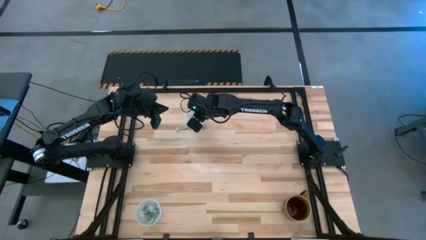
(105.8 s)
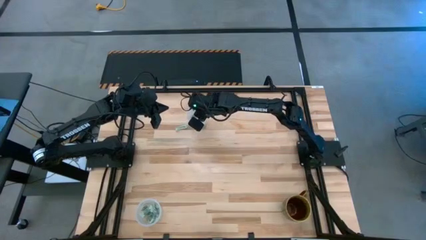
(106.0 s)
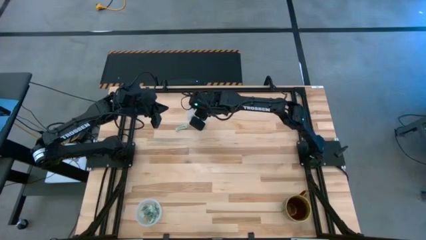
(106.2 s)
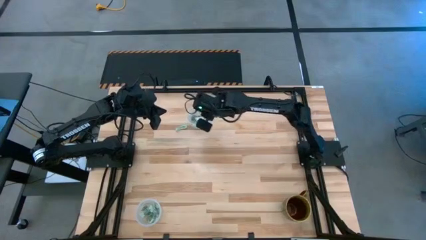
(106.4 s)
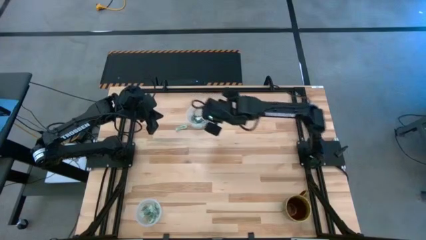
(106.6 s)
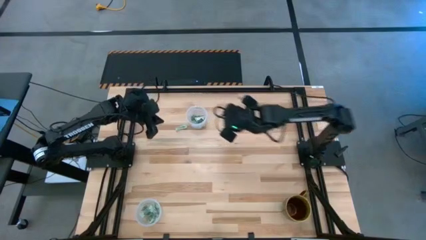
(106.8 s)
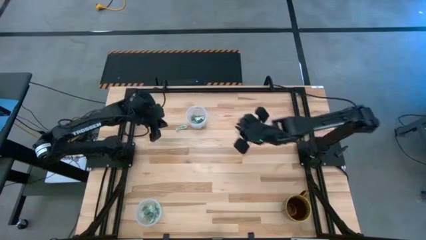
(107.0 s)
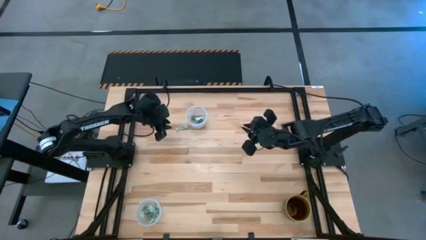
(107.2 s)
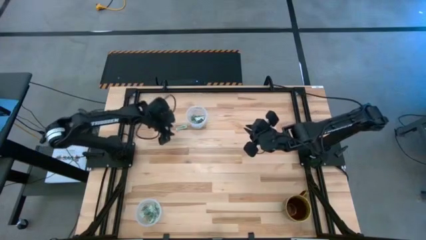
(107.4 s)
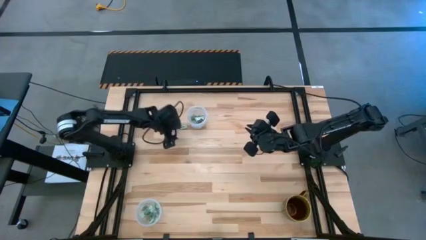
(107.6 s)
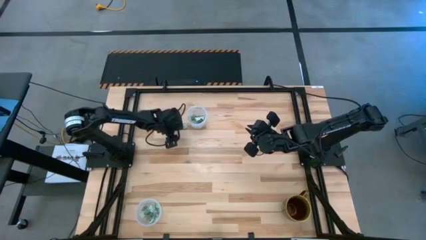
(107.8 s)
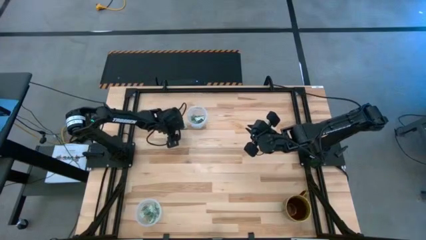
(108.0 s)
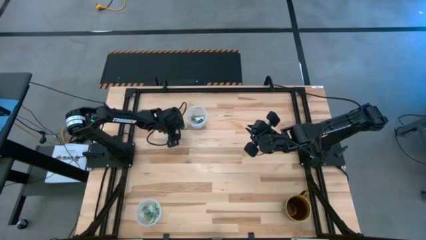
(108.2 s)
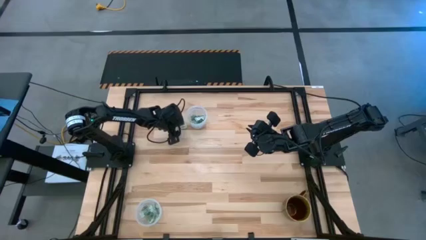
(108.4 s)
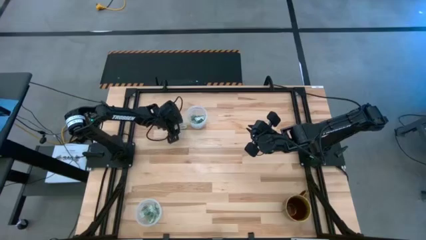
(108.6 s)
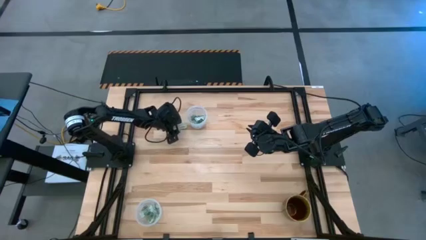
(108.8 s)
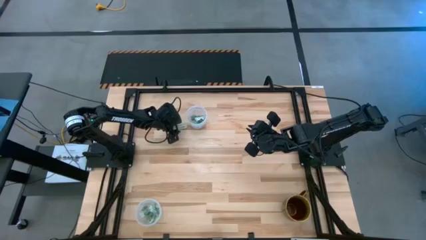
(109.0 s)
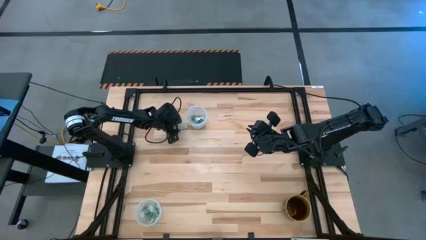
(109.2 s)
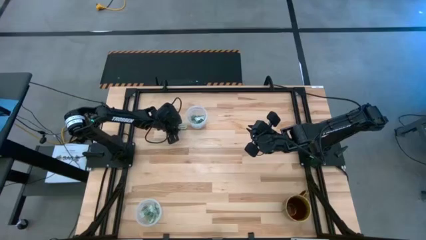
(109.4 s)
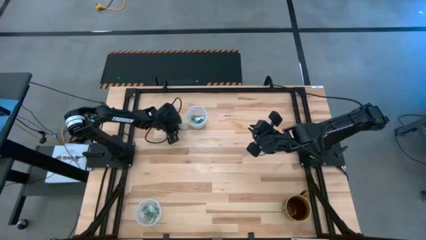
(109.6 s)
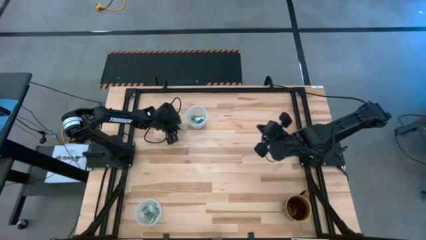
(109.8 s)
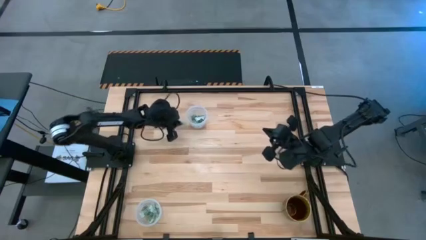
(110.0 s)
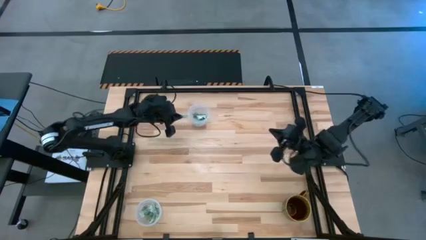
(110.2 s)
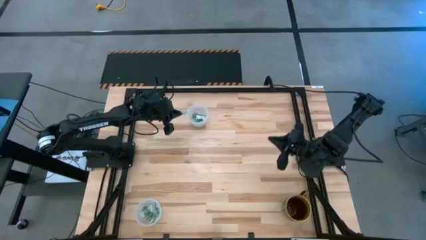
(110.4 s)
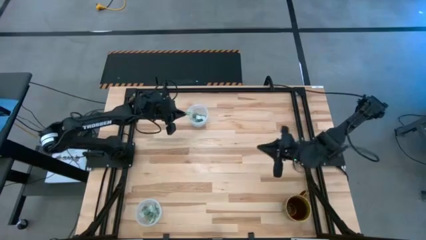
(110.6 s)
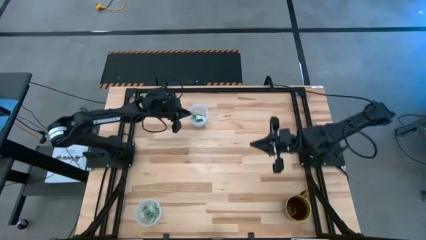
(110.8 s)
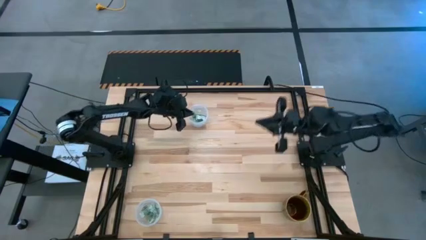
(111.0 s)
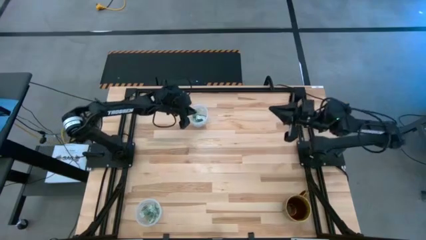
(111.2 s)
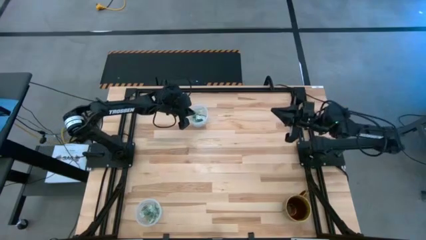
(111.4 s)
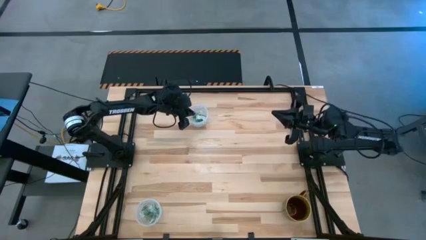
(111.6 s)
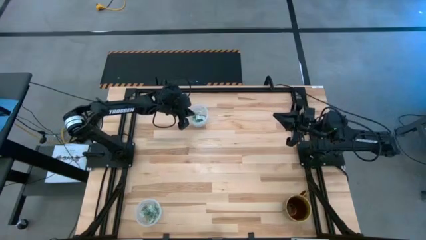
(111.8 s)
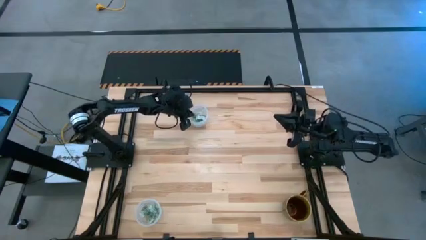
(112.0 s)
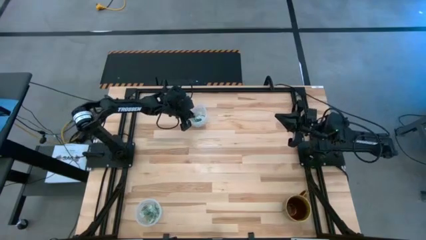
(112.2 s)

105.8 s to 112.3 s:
Task: Pick and place Stevia / Truvia into bins
Put the stevia packet into the top transparent container

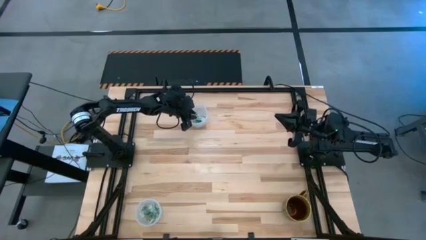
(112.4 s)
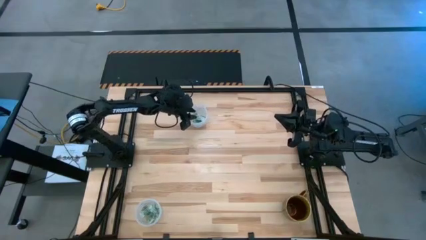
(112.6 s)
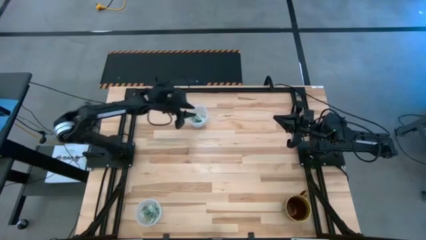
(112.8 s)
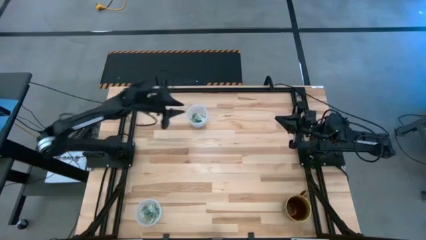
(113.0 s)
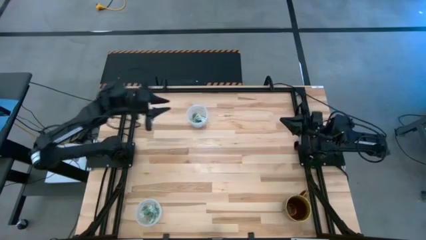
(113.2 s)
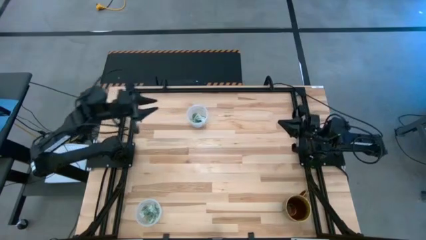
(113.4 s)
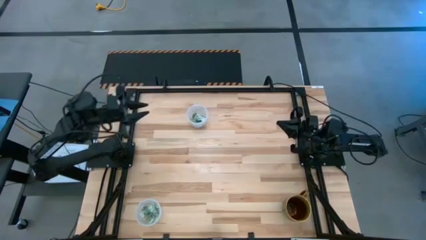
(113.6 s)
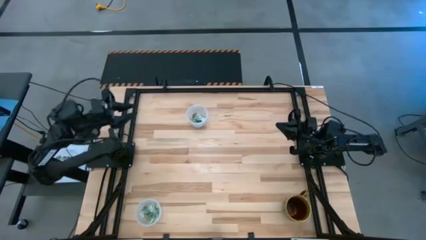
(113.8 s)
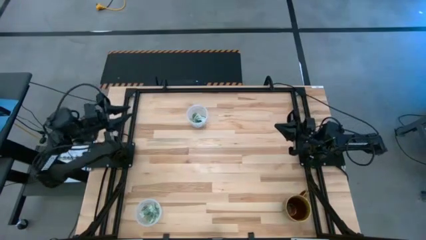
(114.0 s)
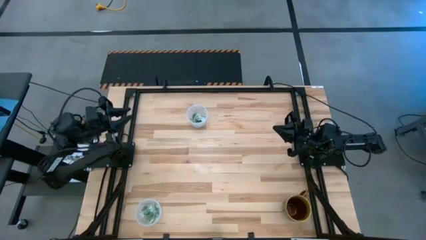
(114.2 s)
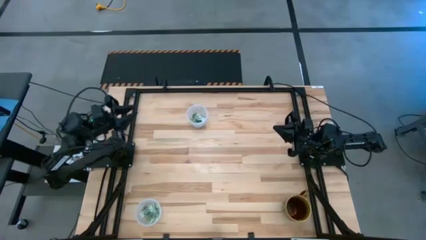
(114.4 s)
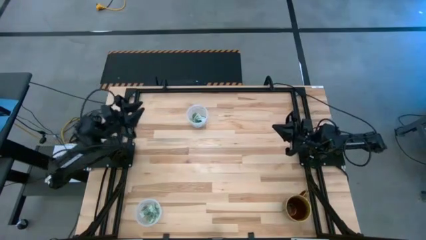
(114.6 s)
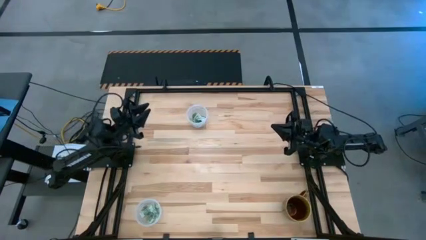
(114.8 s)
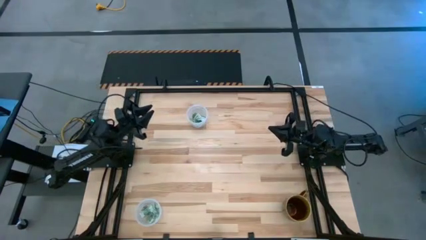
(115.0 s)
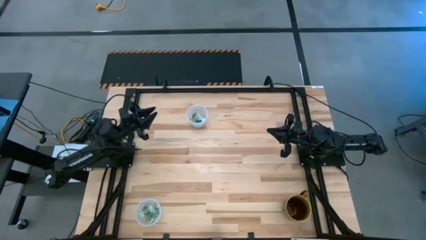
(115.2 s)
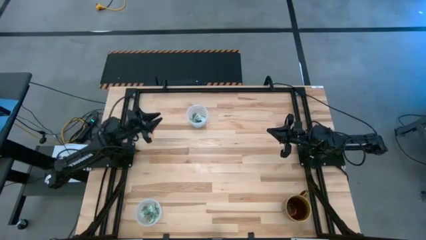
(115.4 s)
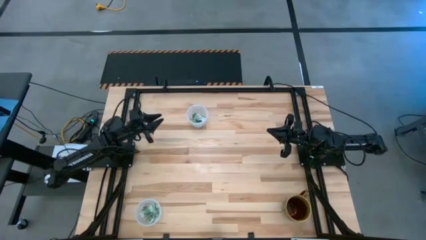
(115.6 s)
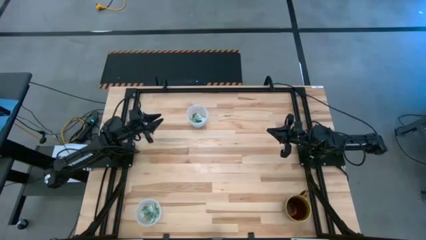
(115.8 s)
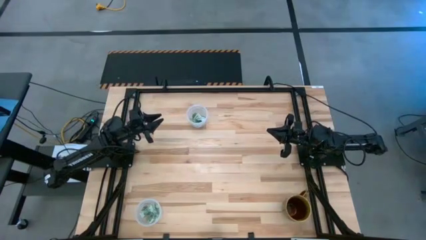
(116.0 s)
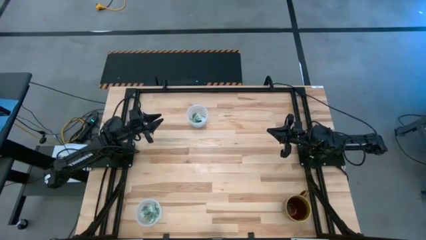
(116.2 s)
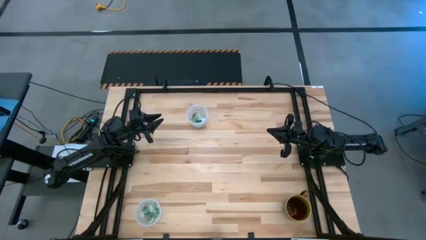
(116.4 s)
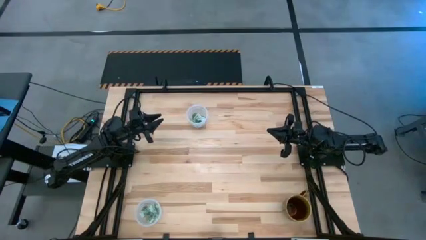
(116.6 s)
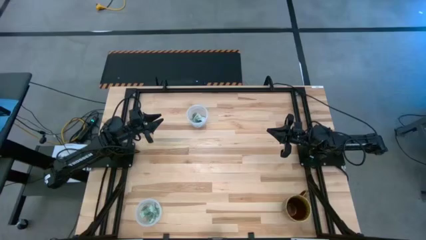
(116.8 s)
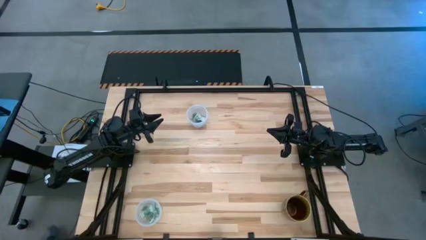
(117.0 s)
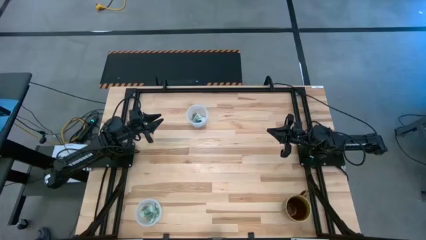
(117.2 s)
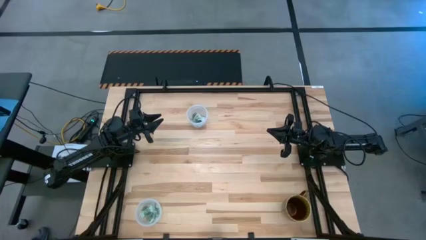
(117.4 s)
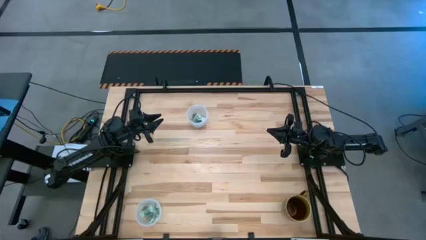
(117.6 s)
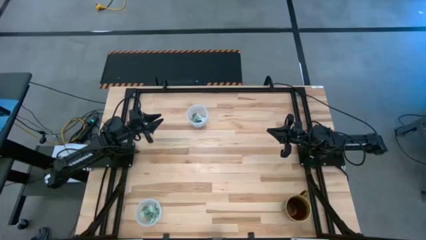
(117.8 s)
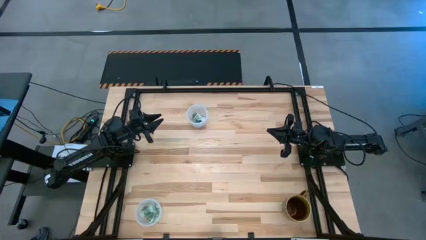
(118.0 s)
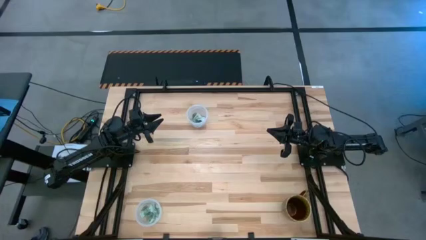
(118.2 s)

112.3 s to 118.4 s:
Return to Home Position
